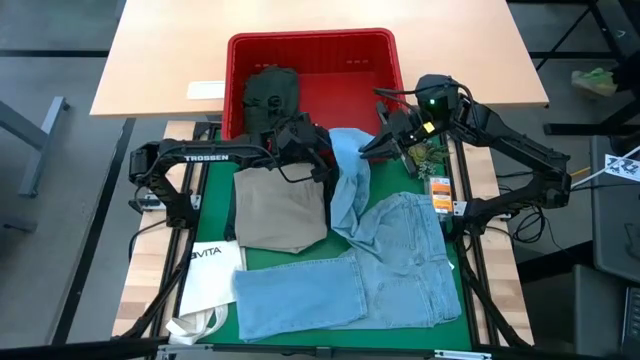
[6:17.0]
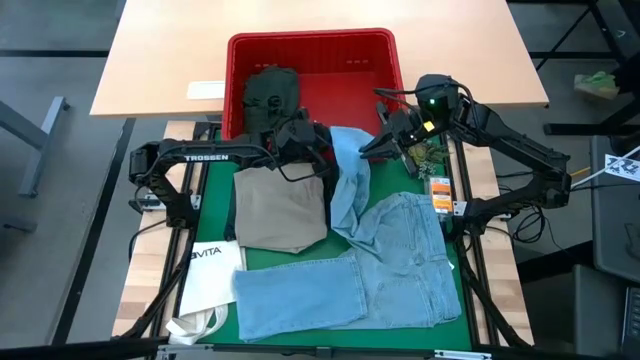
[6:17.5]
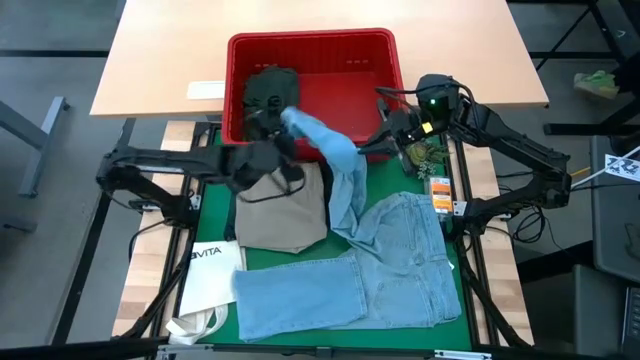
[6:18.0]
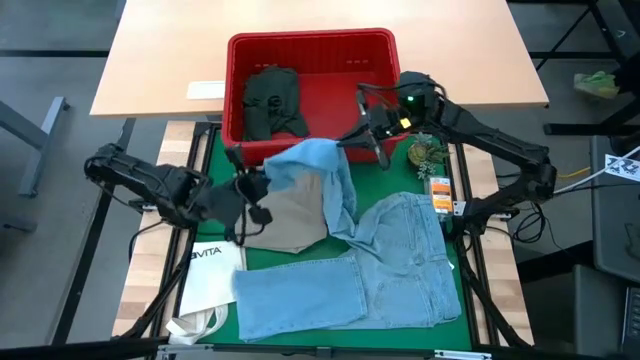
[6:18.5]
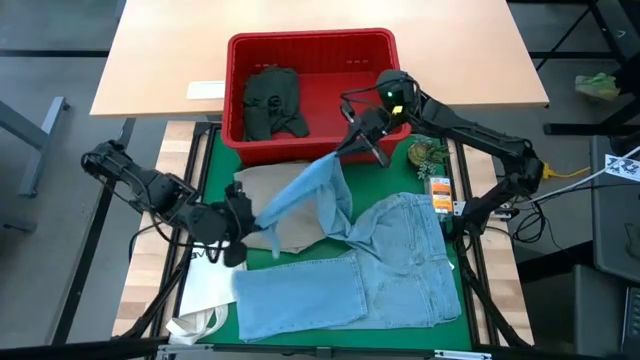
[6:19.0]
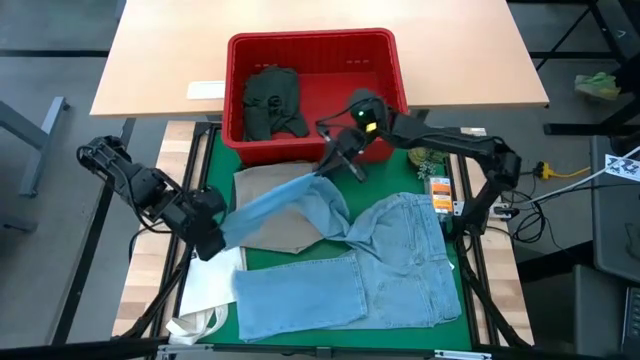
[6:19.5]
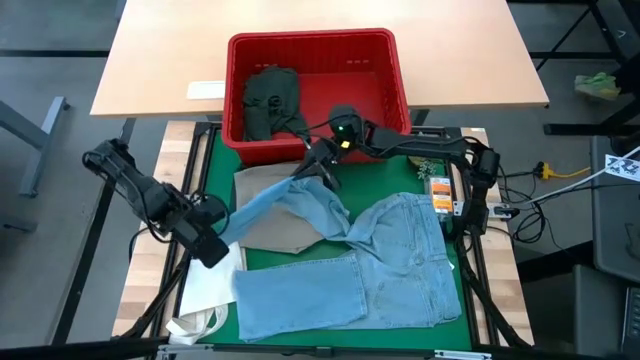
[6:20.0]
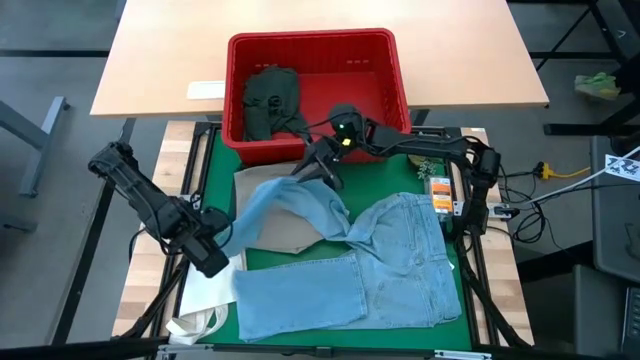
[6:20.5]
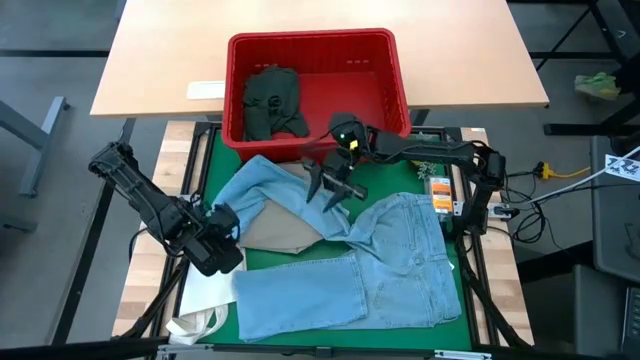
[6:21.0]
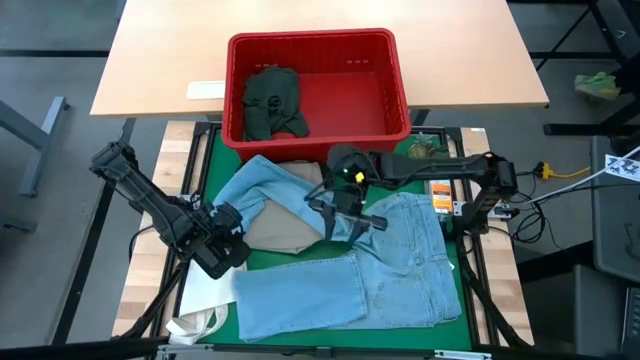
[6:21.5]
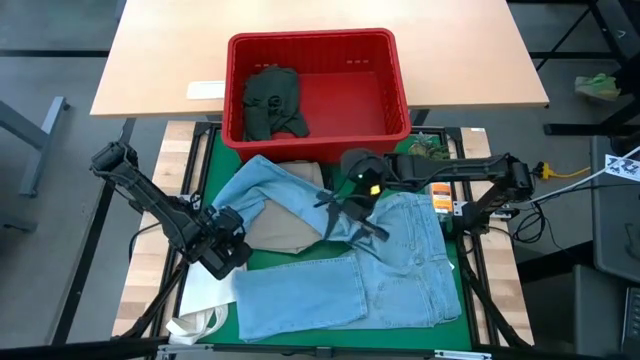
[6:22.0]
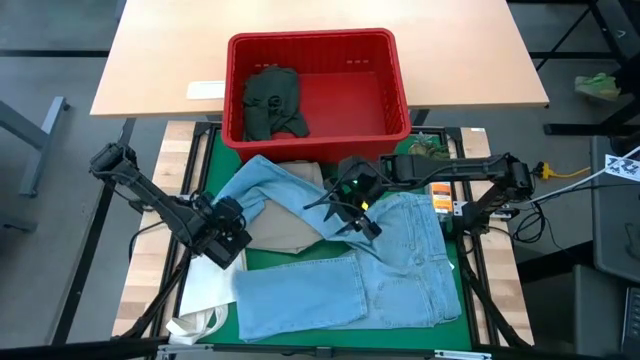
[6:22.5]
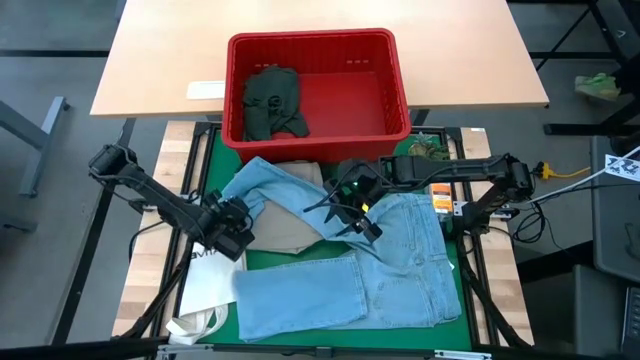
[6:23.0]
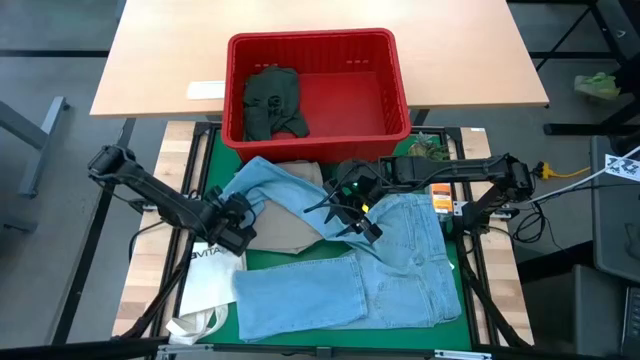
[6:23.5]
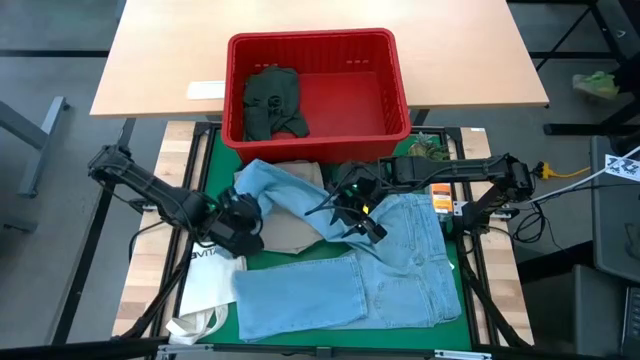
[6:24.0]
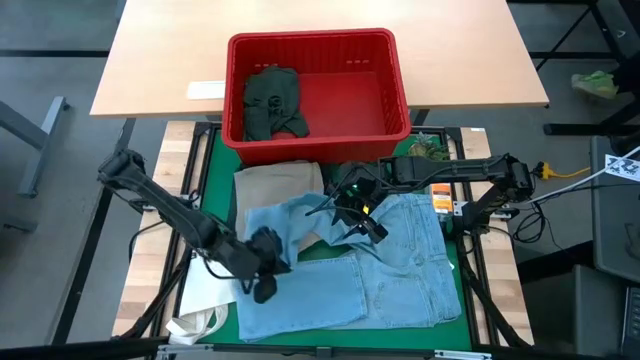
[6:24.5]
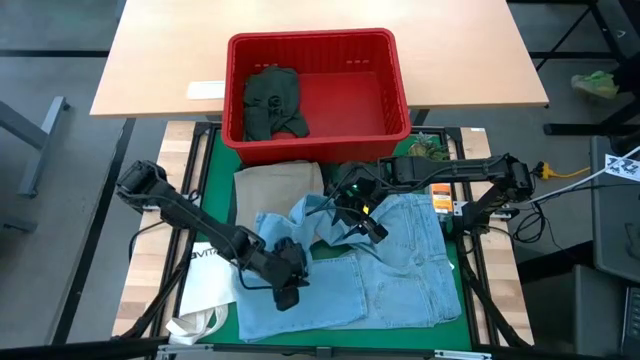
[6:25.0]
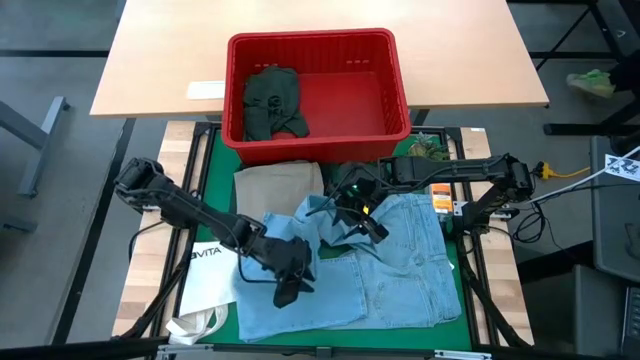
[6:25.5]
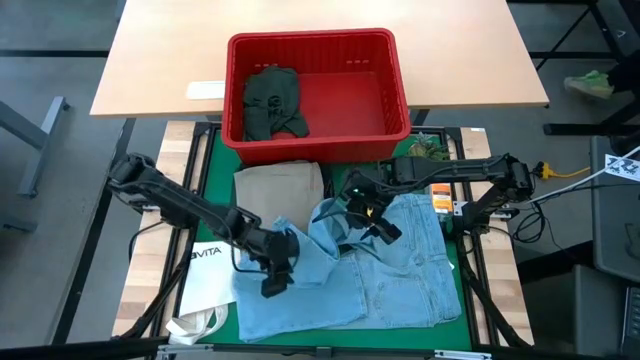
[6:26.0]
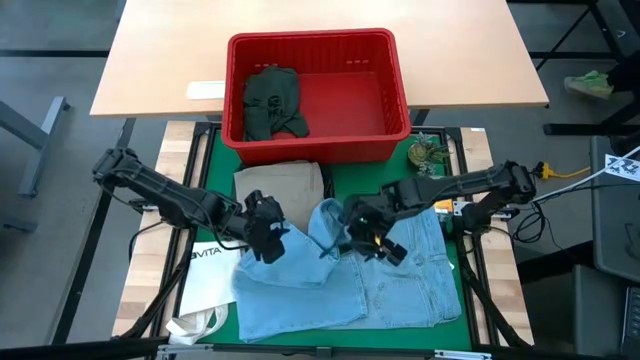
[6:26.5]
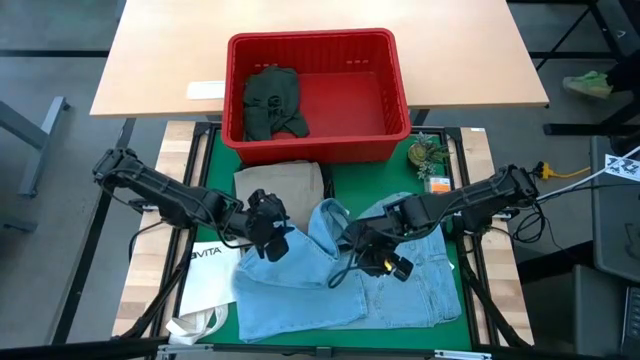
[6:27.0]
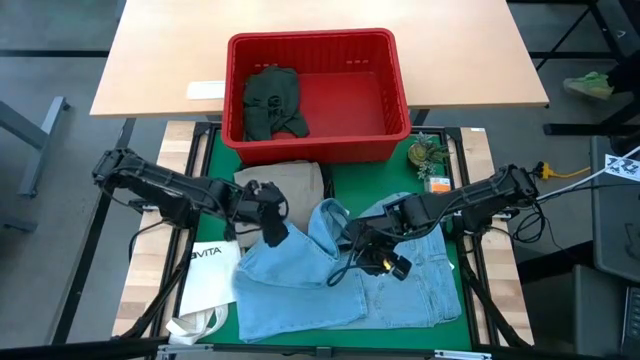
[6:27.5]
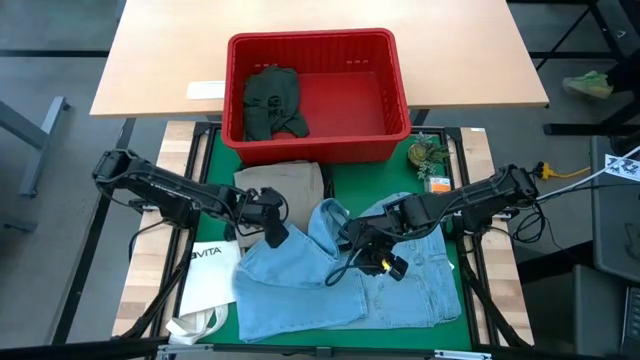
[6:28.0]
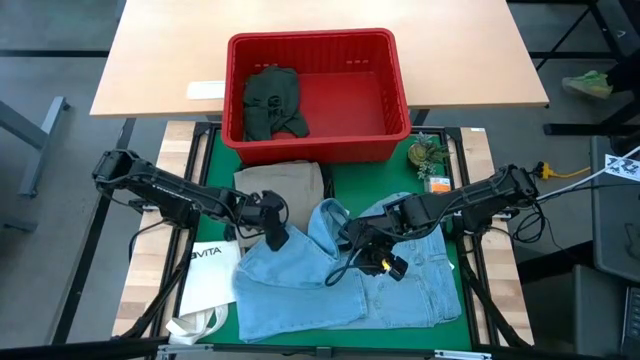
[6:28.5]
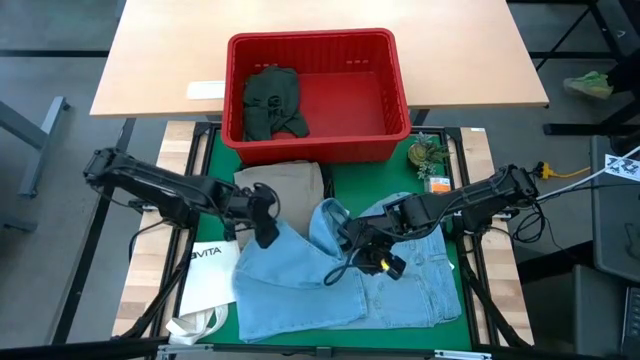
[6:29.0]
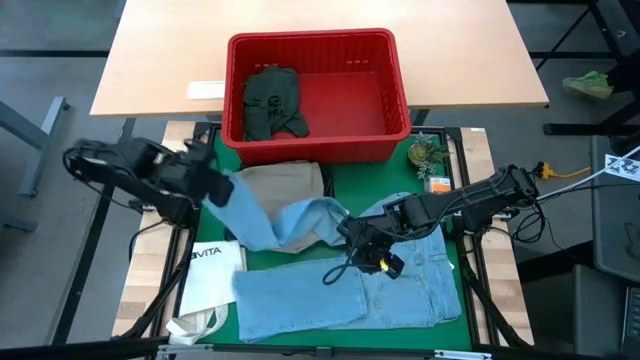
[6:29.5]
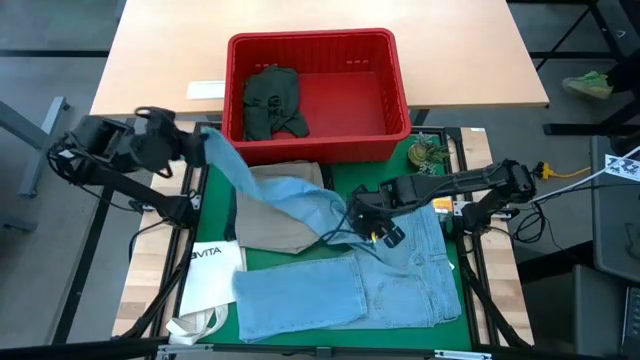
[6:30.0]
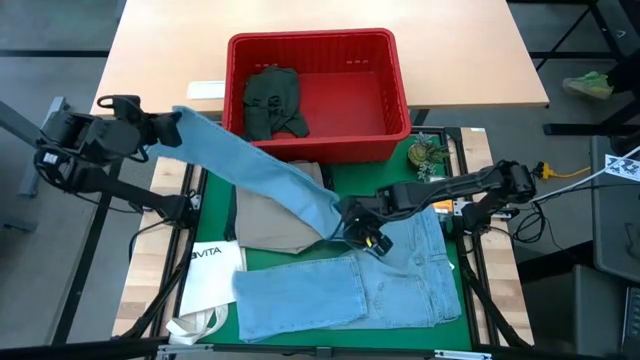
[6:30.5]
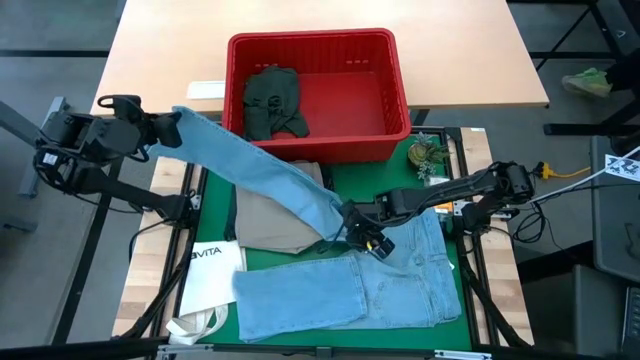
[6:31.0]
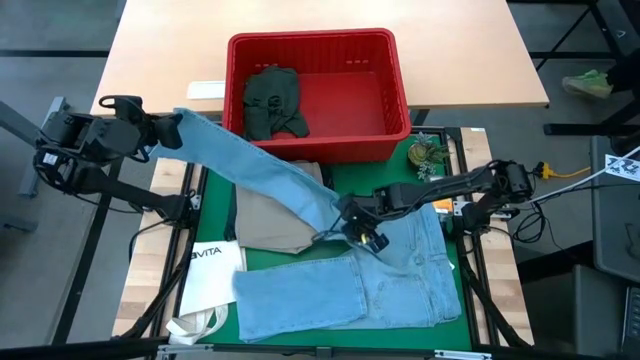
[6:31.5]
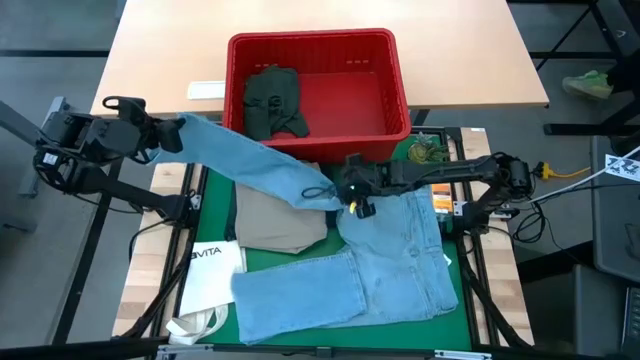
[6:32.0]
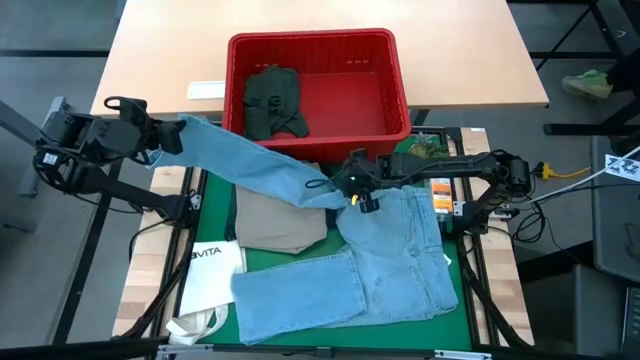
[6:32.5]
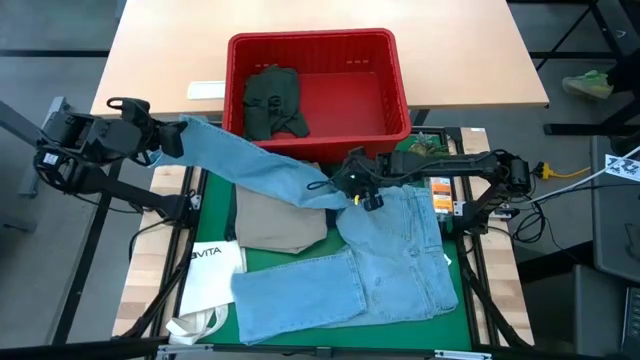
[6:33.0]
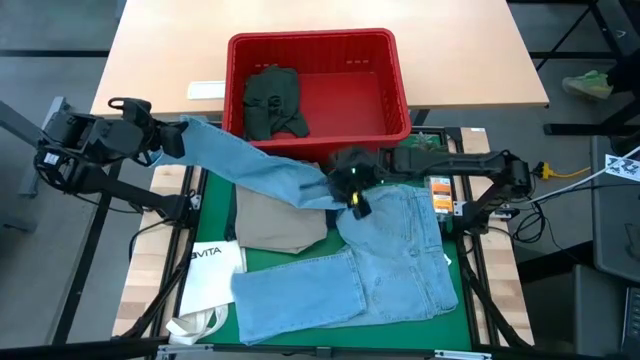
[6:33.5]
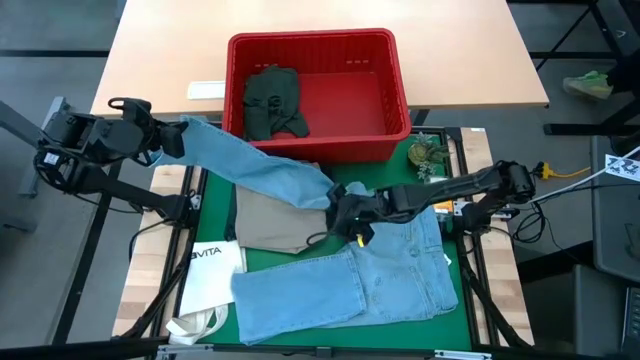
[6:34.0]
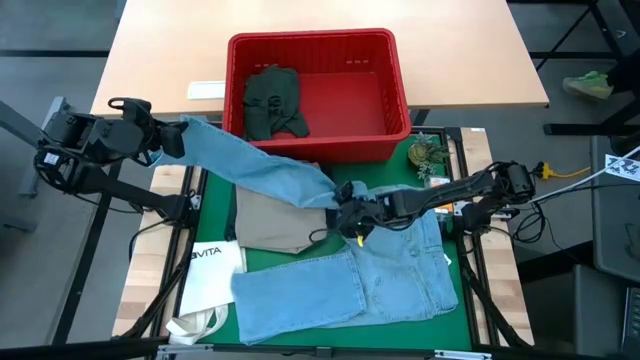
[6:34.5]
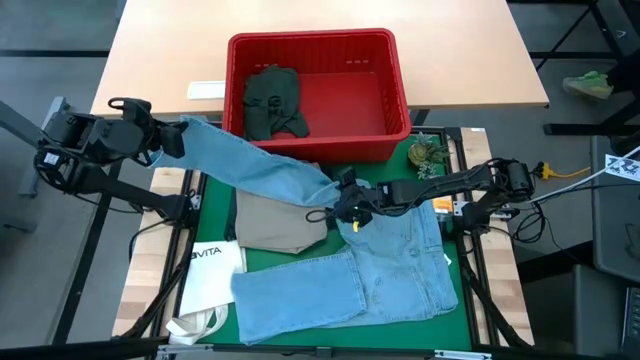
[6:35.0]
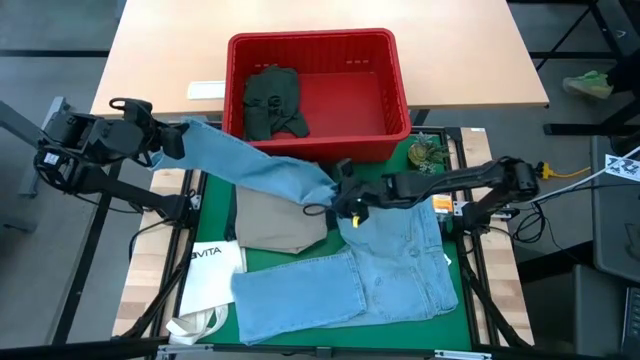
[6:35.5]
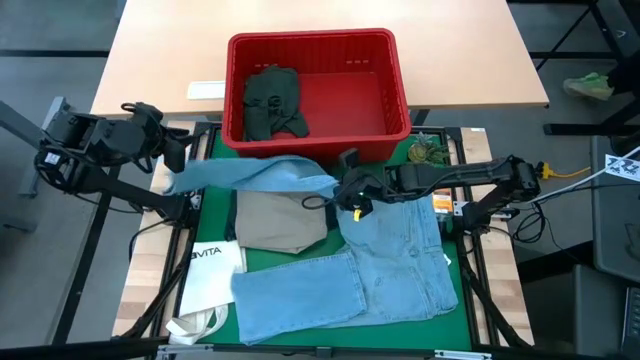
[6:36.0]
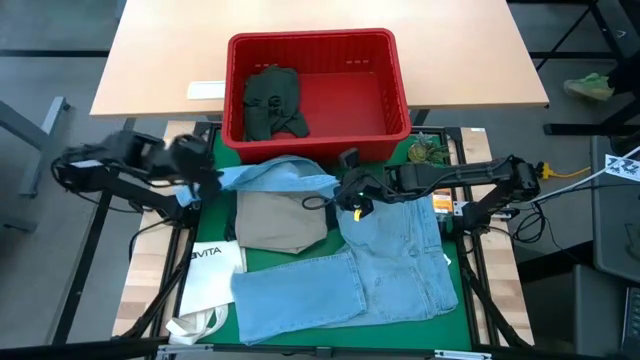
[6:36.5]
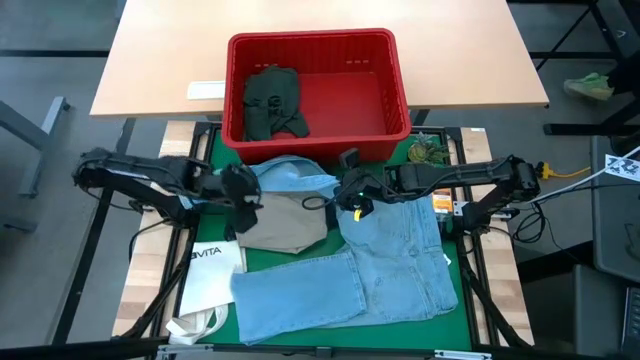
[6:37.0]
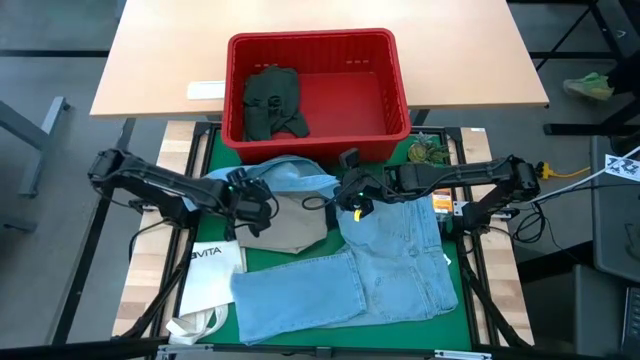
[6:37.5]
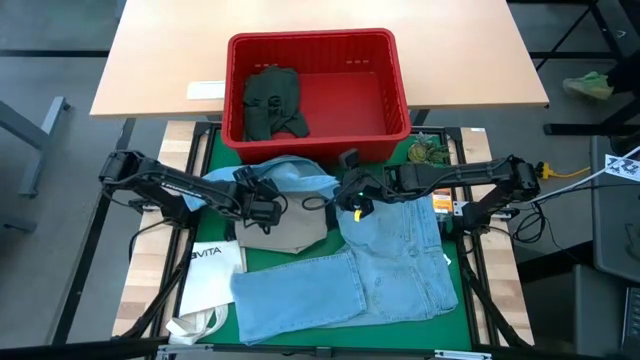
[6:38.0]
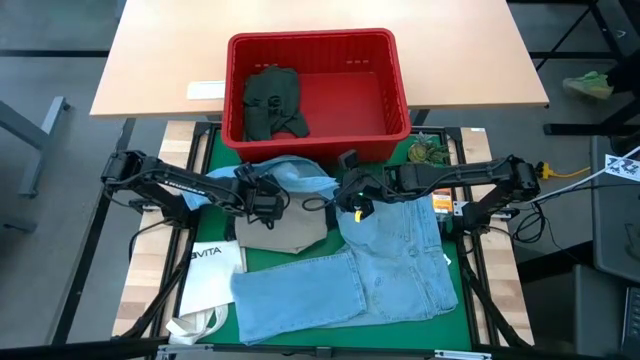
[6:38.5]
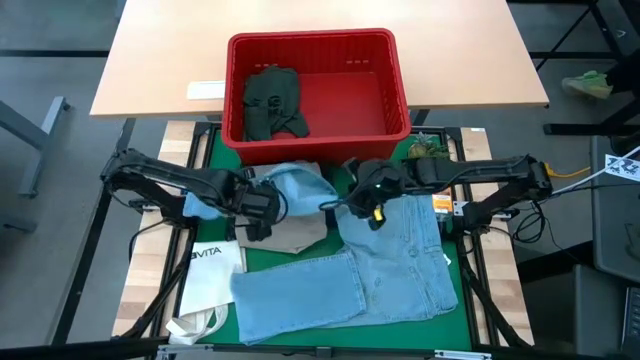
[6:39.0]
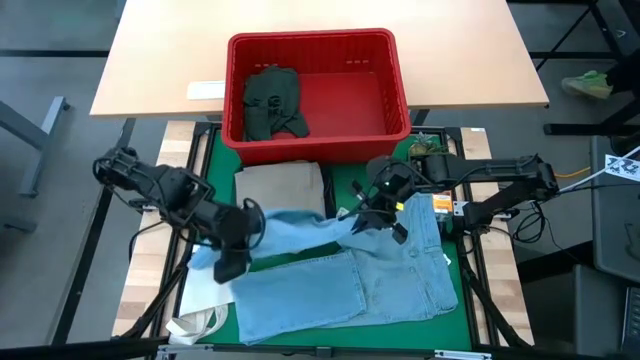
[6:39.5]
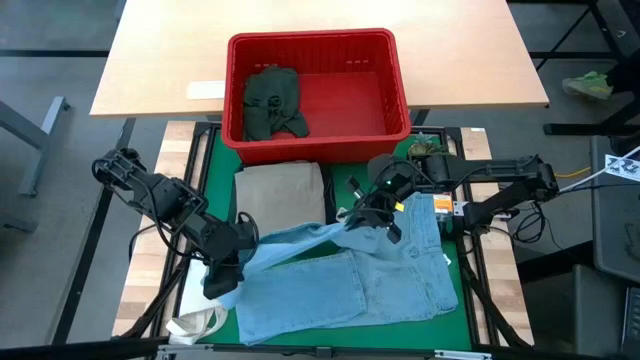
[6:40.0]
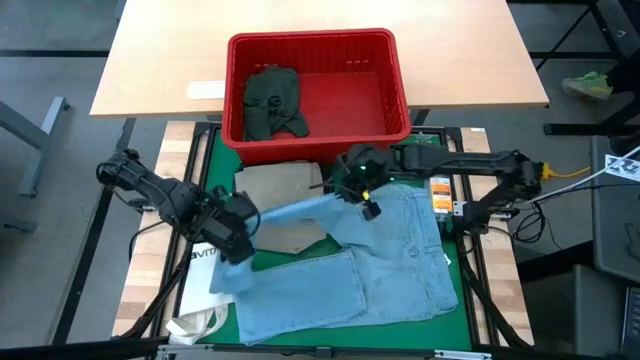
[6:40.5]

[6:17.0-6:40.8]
Task: Fold Laundry from Bin
Fold the light blue pants
